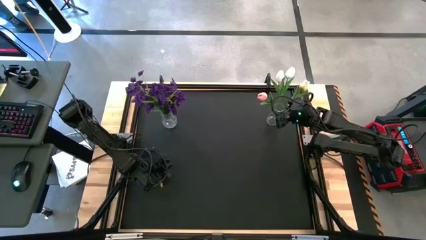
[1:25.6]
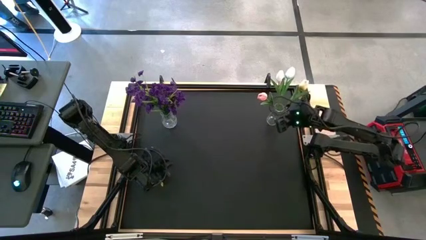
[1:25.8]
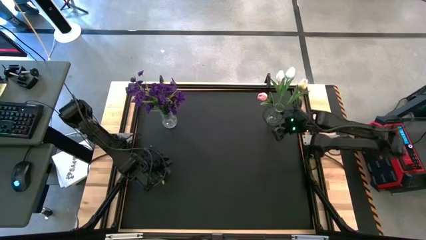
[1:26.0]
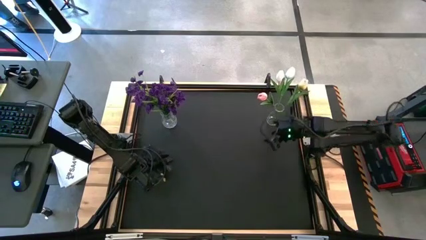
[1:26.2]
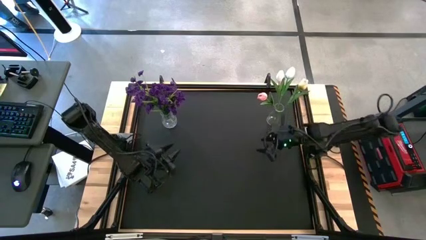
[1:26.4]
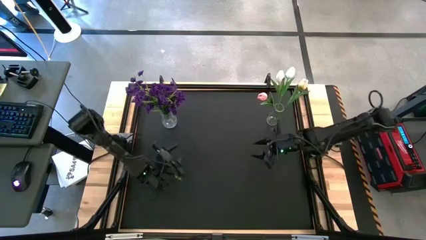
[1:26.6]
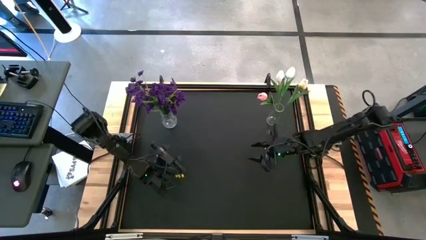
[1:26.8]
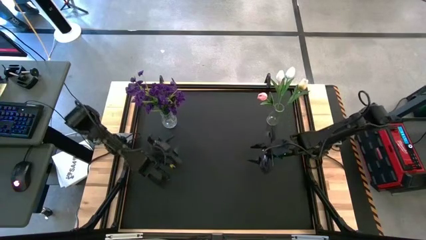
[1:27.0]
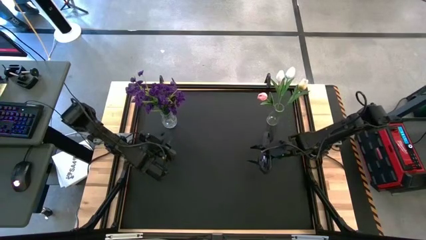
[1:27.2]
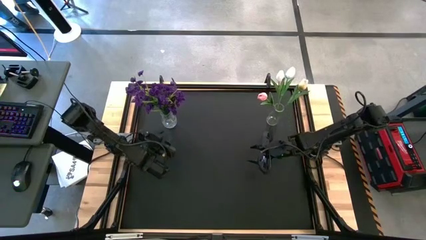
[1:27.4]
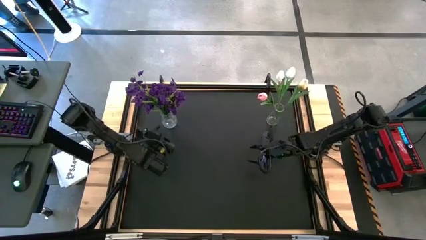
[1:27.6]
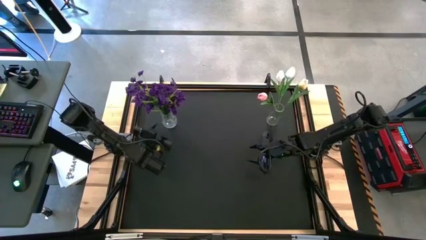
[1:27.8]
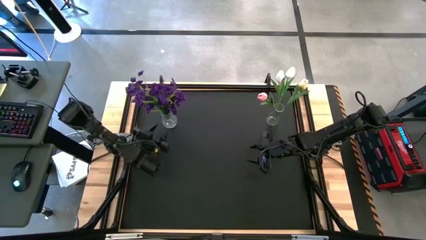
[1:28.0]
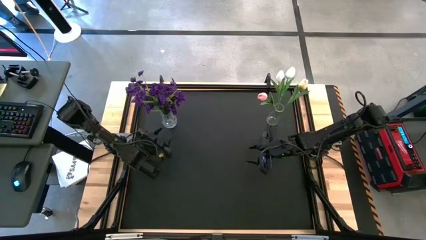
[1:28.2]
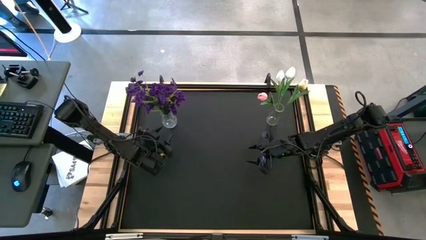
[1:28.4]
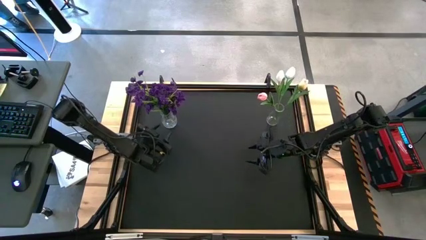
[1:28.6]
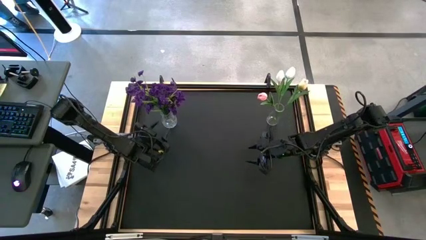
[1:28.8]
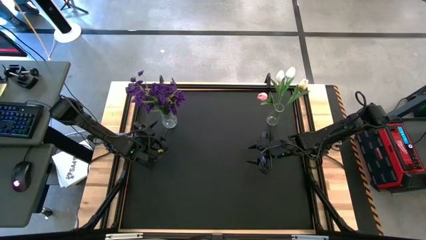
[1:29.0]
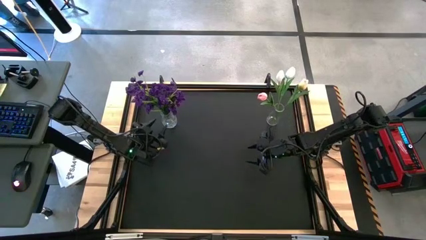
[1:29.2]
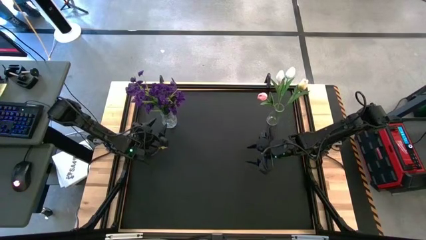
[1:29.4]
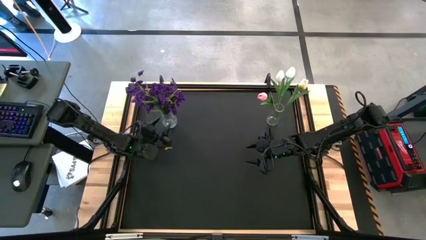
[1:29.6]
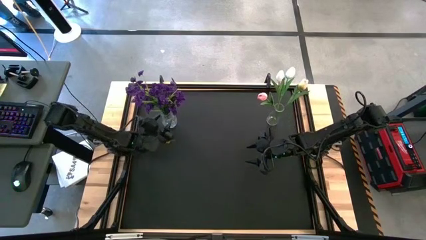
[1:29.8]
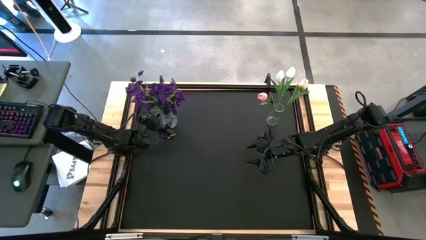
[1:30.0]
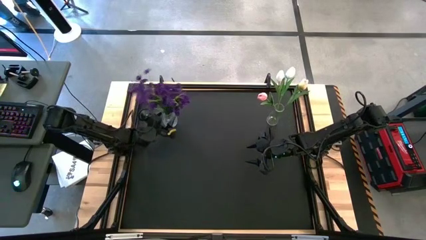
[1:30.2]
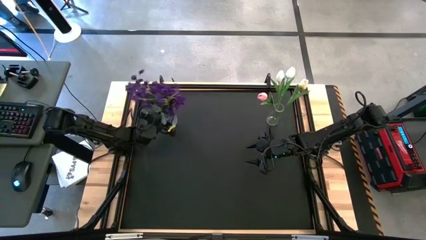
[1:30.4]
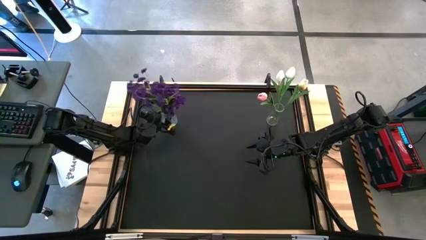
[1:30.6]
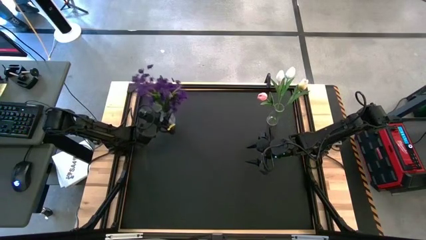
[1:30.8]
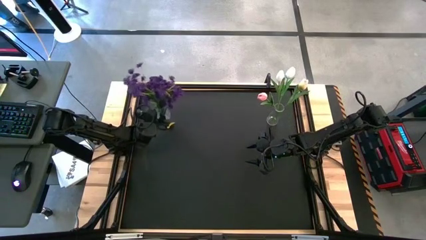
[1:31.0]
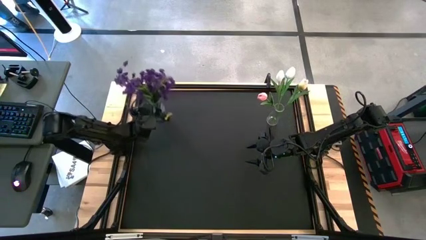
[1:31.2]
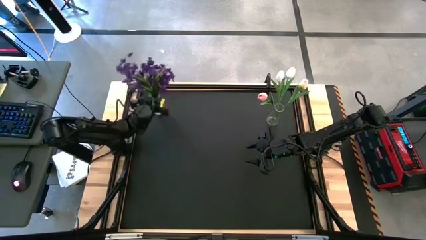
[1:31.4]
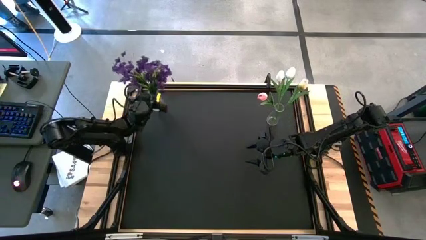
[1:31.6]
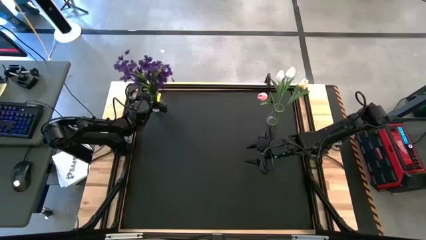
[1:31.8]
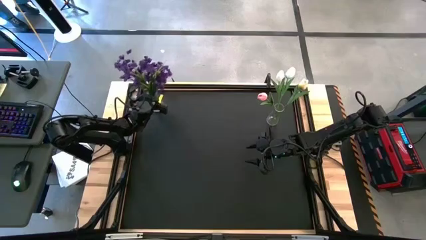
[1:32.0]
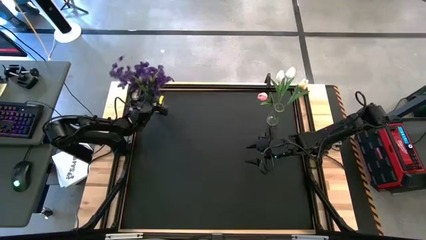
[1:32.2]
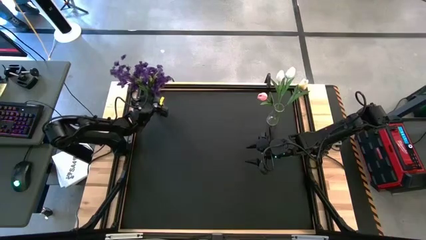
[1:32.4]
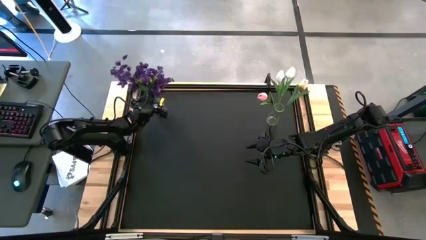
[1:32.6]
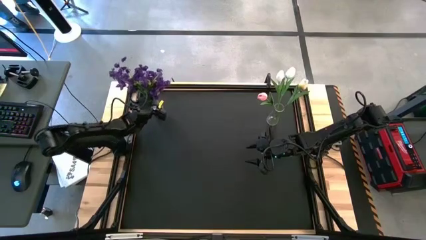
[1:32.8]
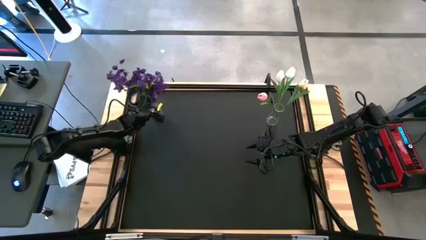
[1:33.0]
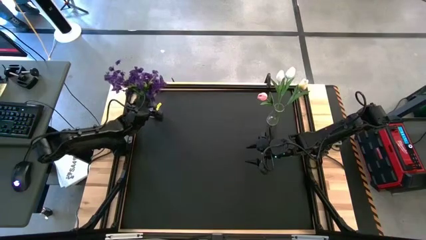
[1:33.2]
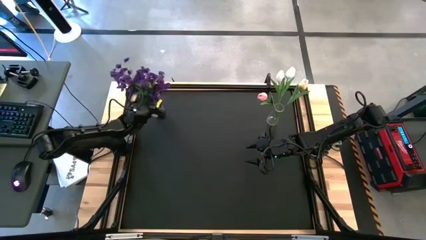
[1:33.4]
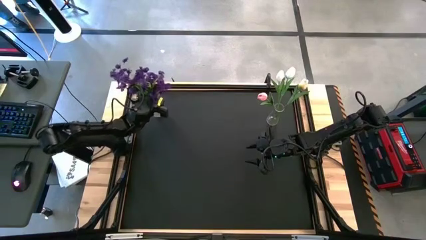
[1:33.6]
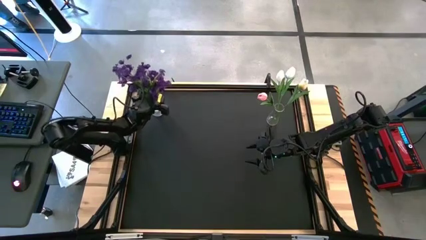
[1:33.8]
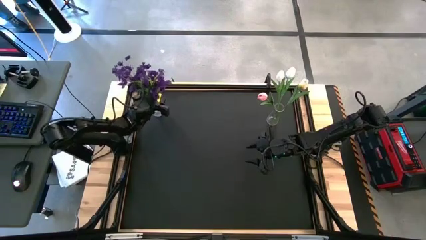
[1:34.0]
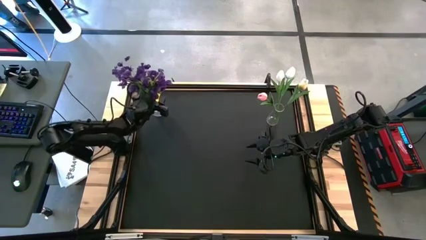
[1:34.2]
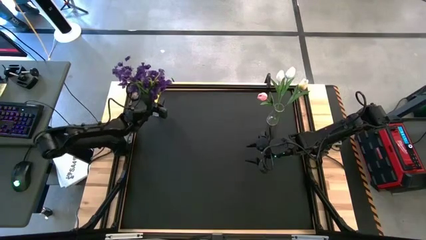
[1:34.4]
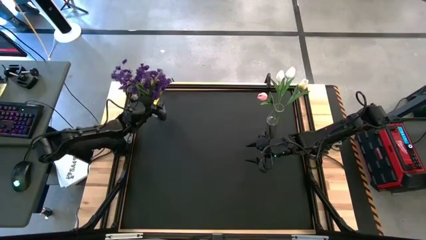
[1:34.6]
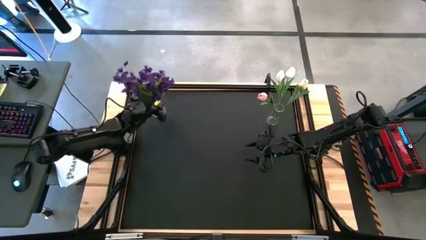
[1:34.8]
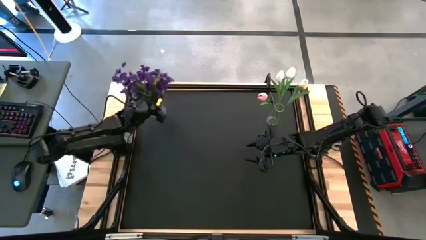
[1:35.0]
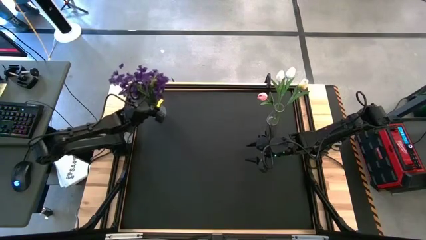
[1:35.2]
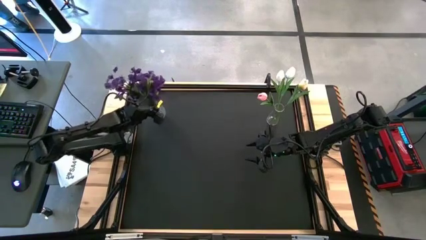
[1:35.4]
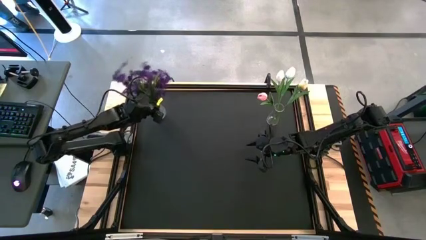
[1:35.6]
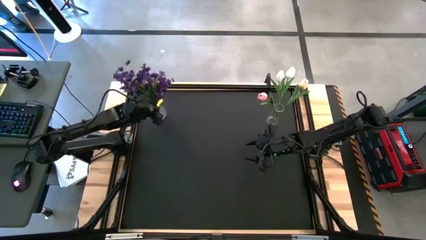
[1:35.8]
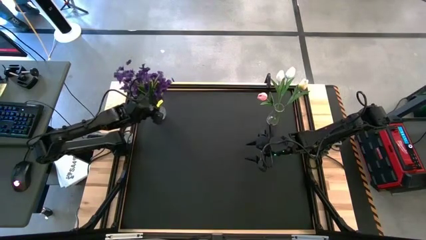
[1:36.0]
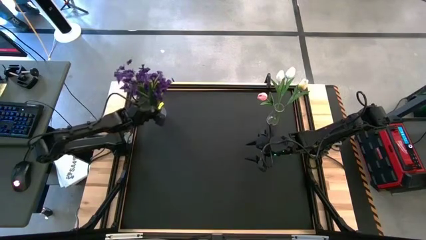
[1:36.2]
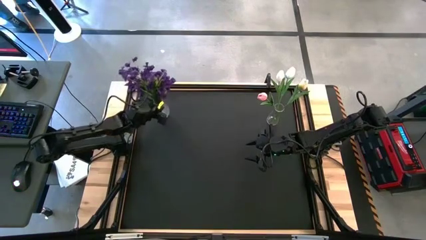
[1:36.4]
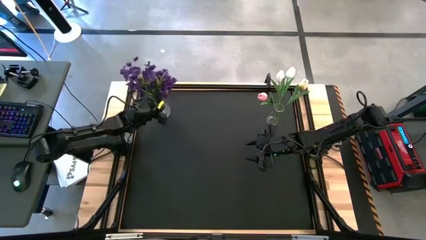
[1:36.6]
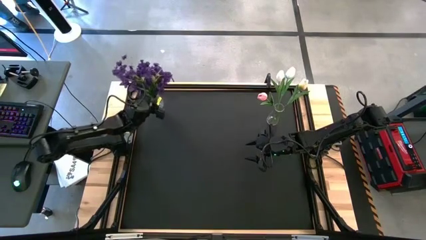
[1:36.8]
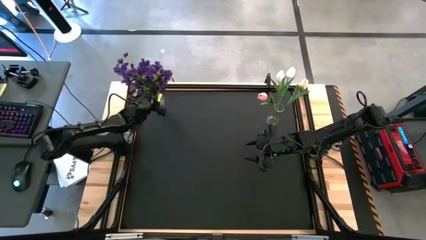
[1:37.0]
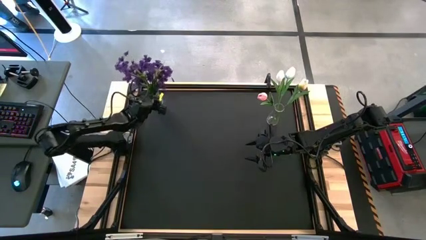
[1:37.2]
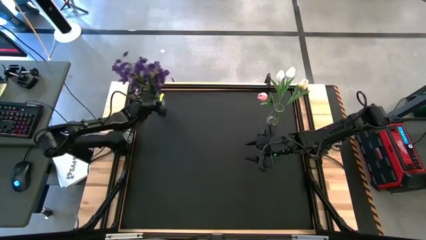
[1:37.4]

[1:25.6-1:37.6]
Task: Sort flowers into vase by color
Adjust the left transparent flower vase
